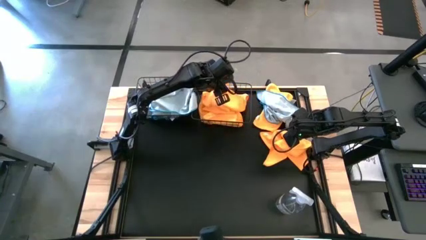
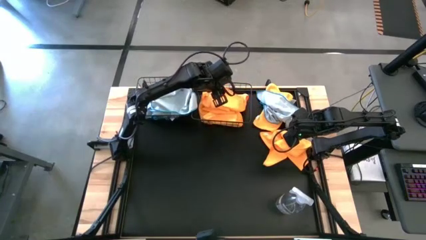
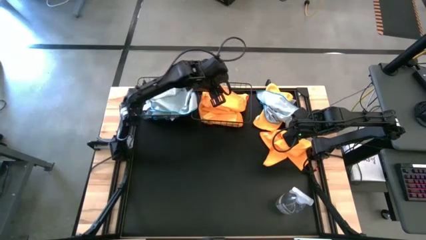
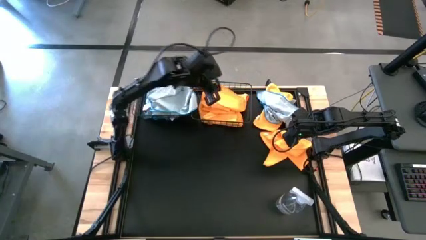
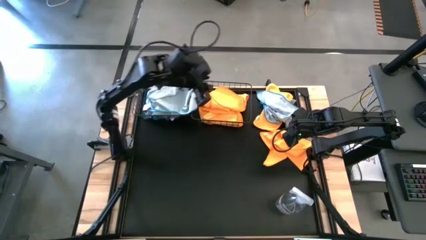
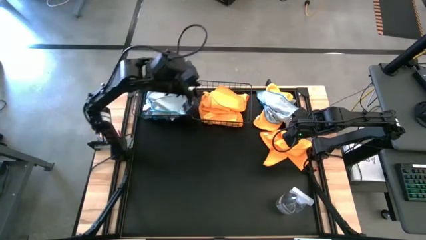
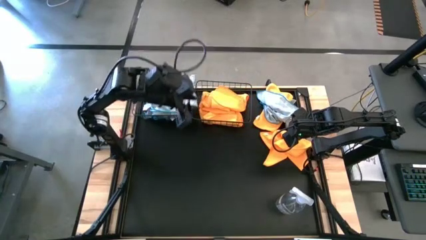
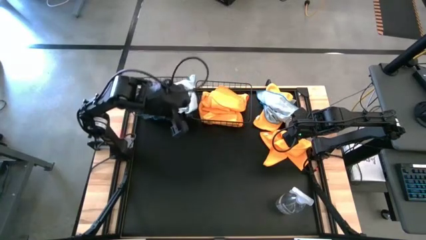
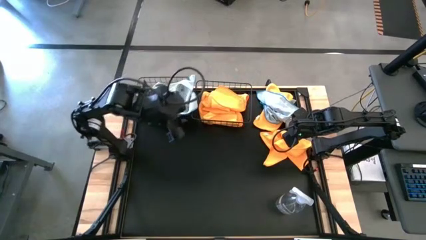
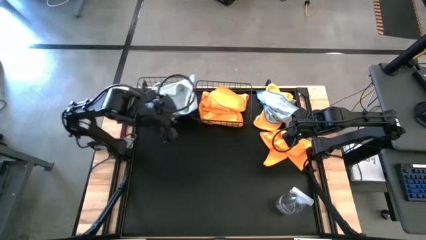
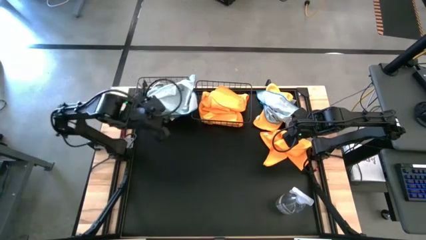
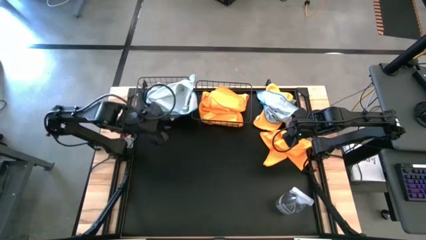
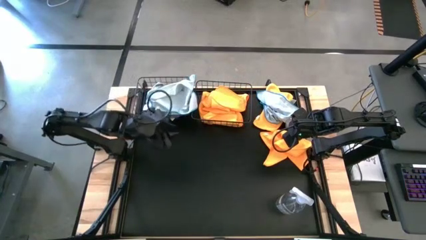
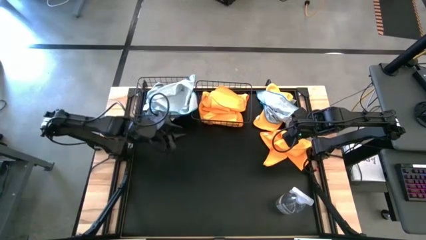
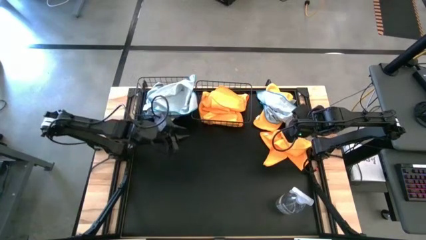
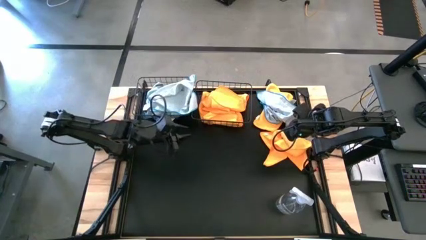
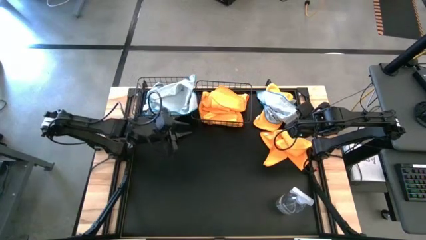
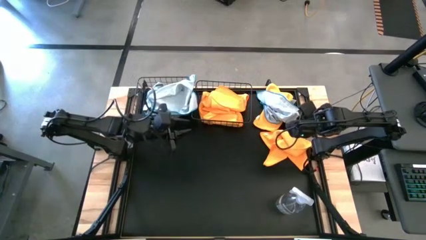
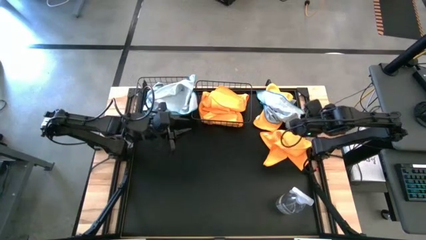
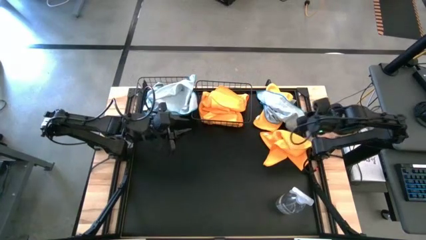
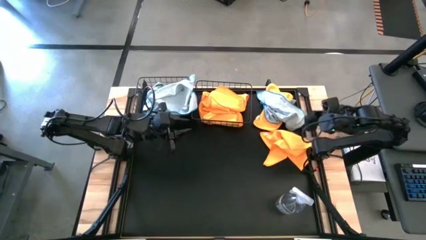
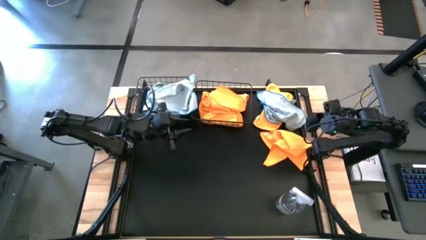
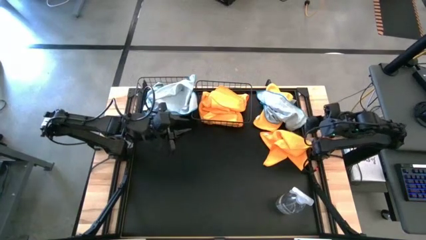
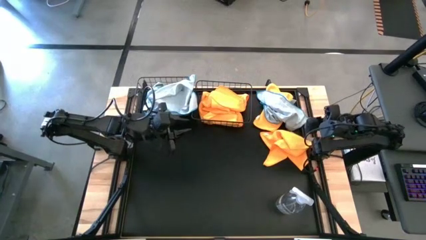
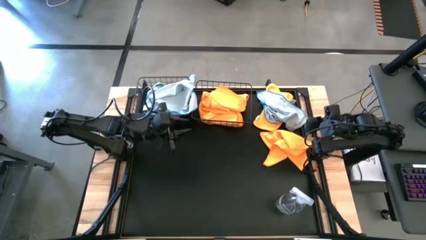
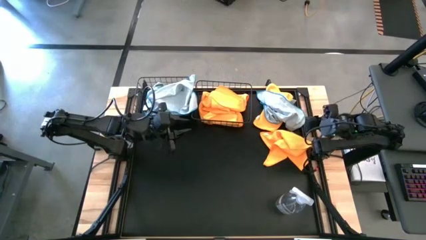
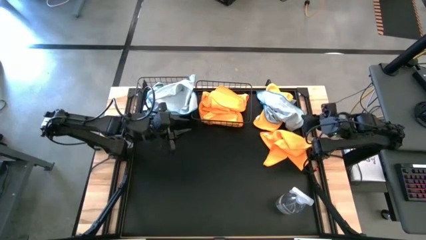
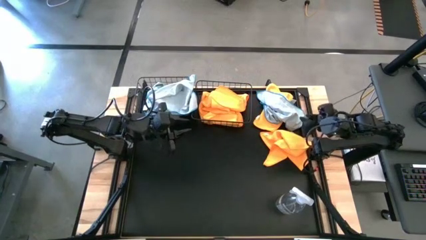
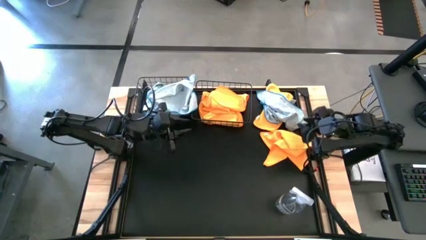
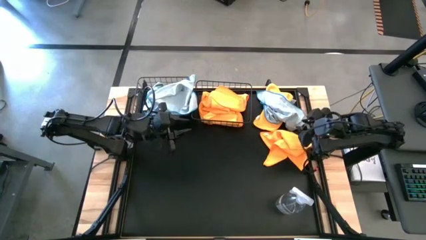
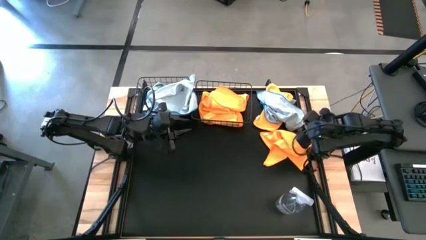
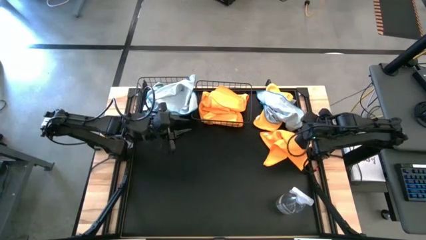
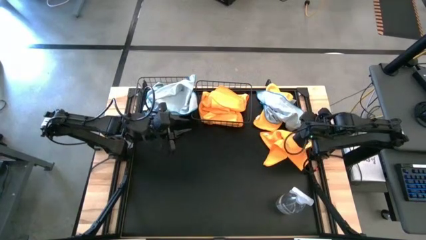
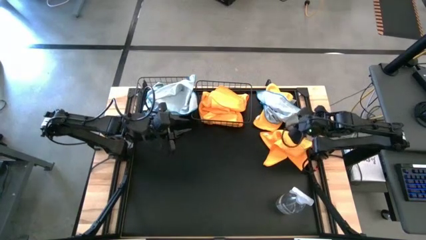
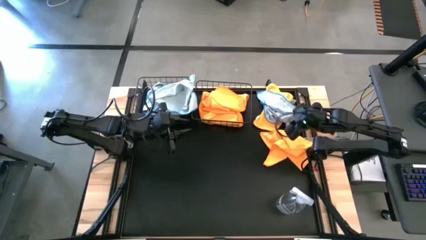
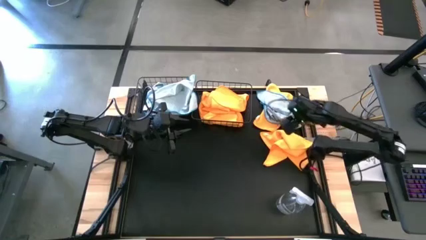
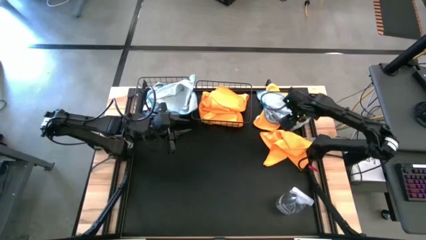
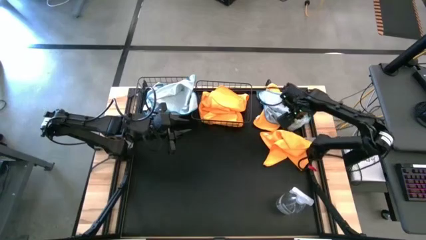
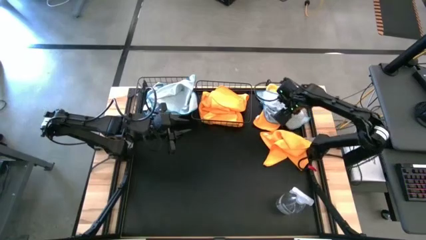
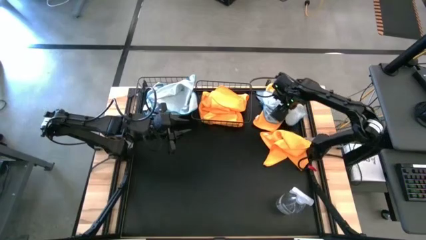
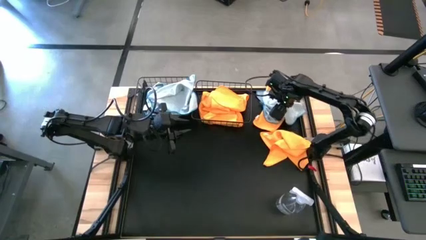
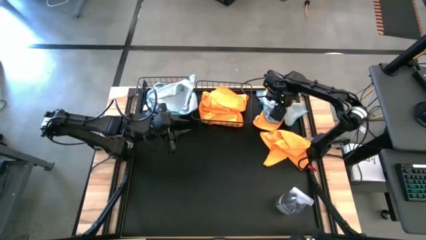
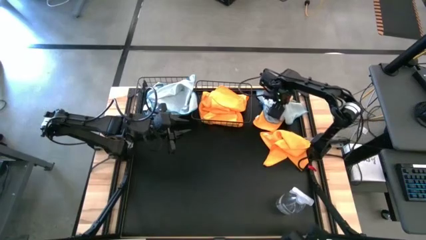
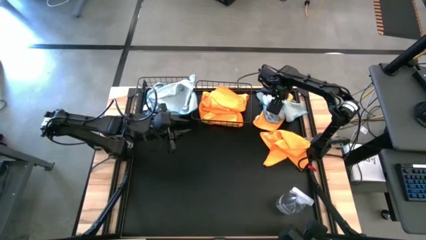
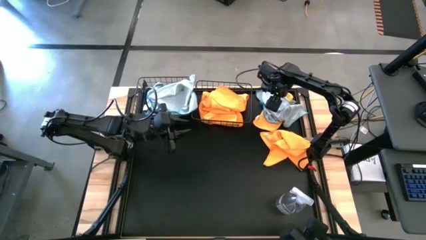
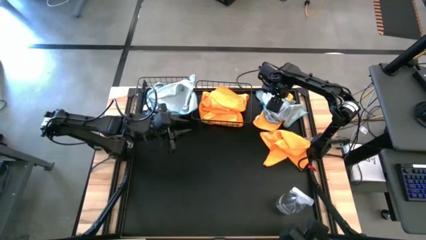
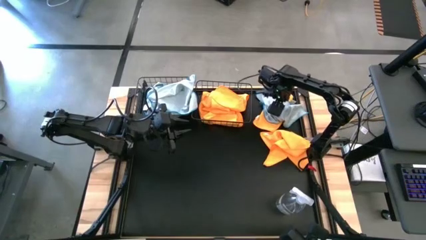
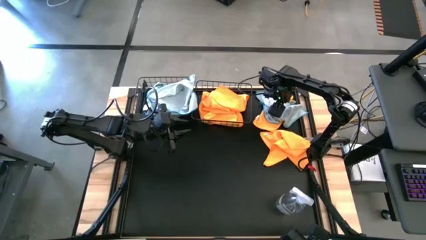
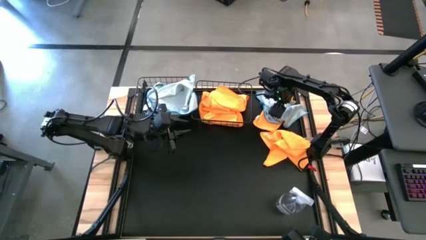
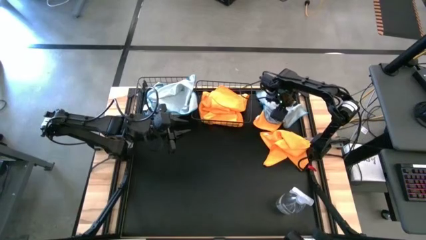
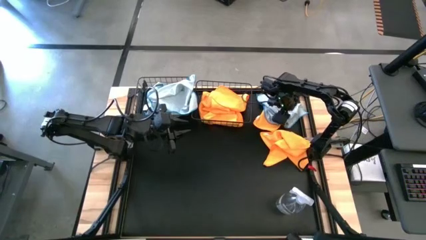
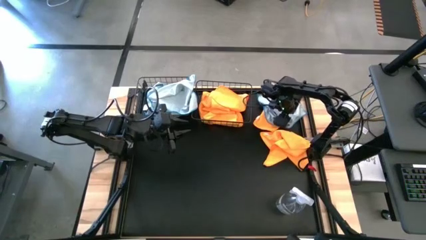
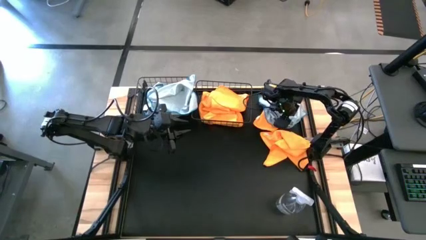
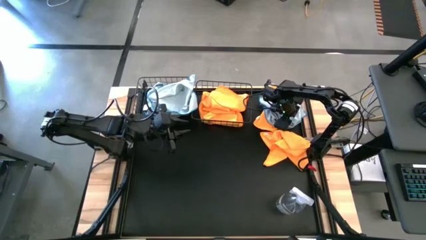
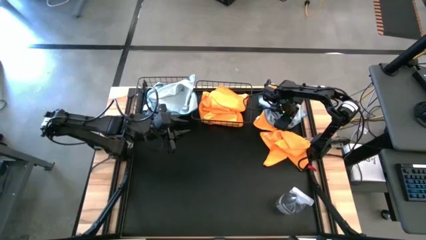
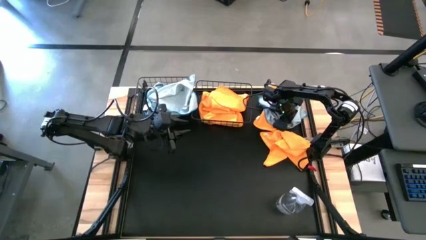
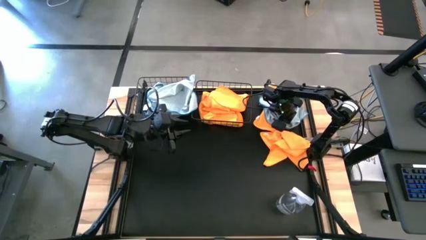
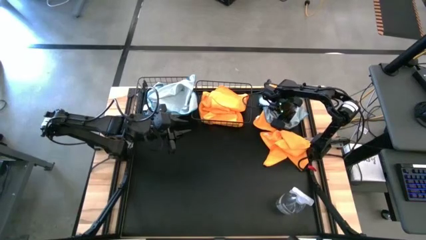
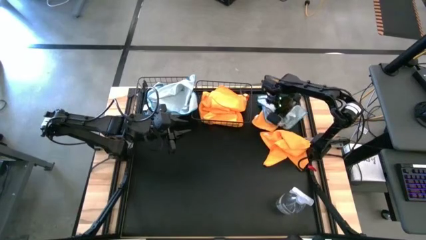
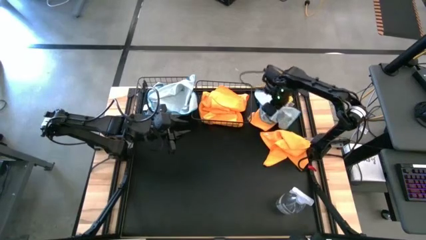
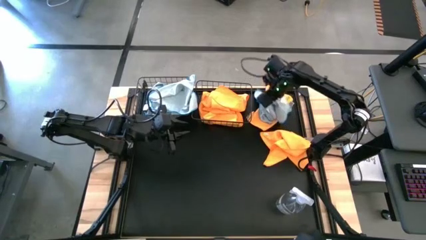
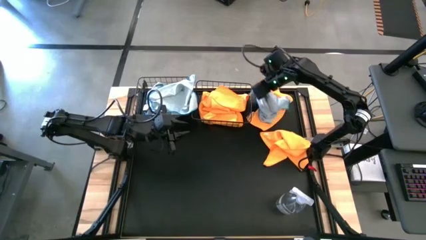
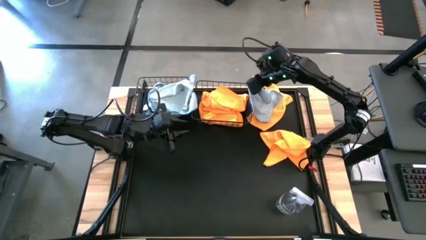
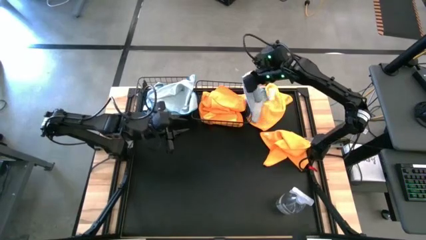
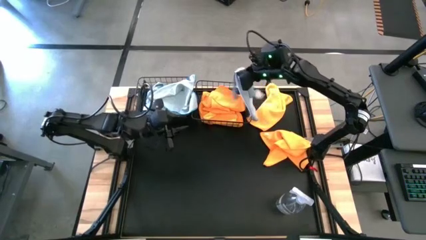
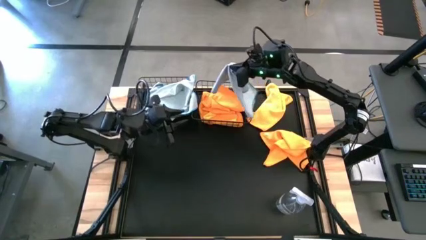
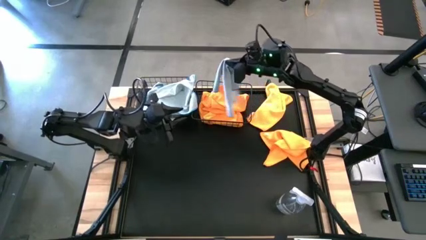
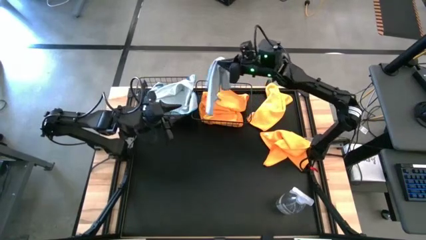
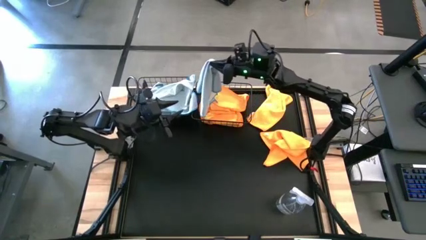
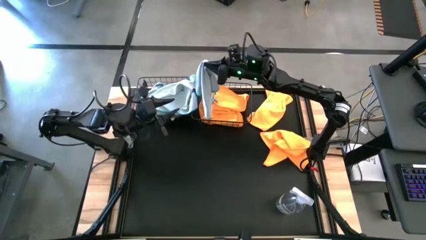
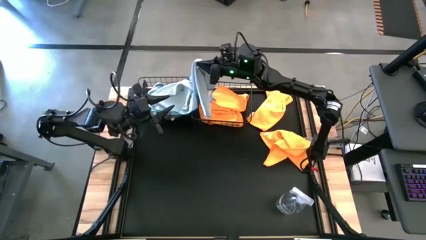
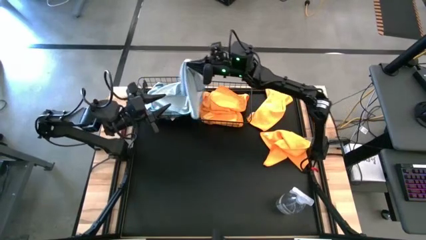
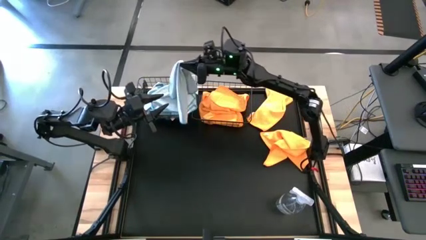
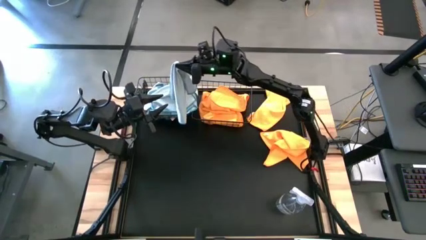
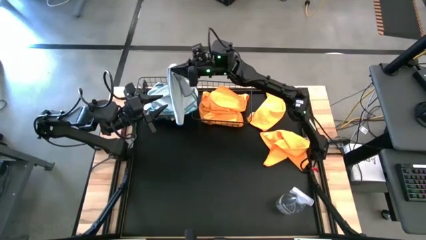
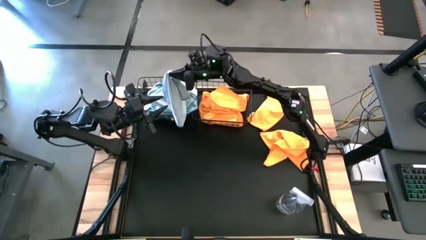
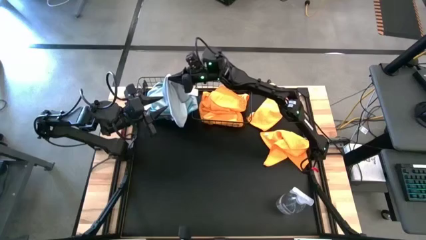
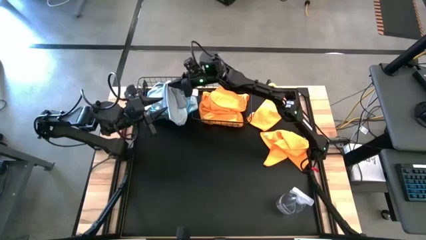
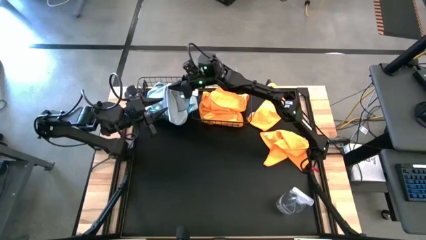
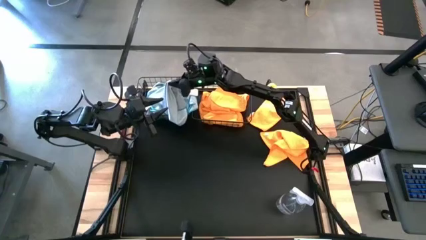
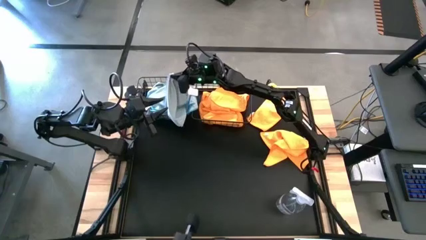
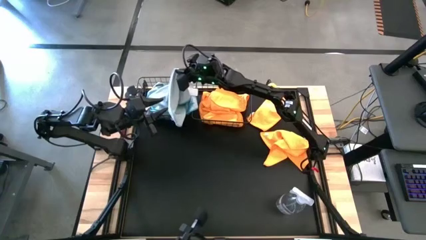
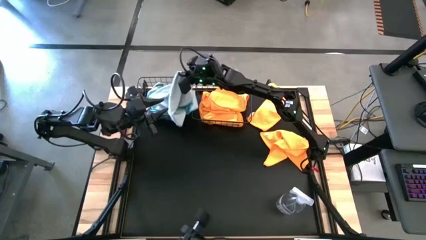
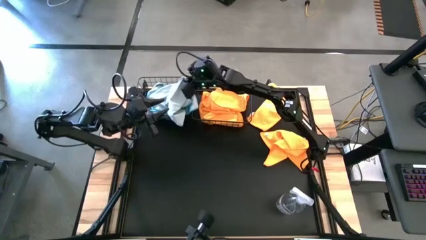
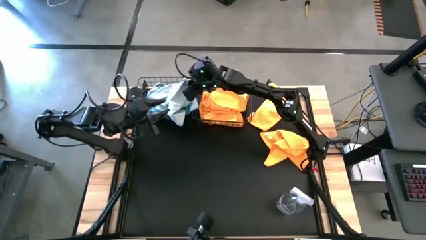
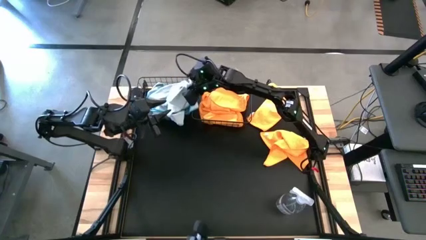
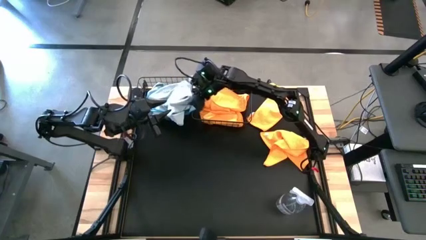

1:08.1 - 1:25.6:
Task: Sort microfiber towel by color & place in baskets
Put the blue towel into the left black wire basket
